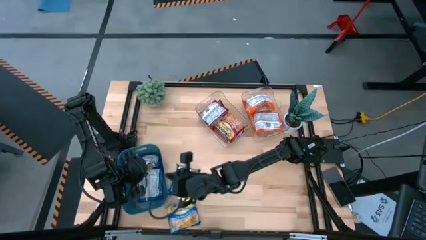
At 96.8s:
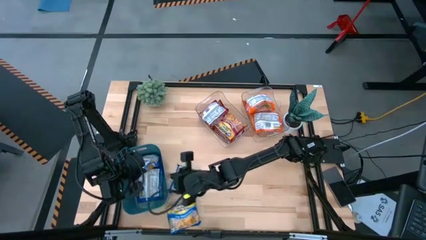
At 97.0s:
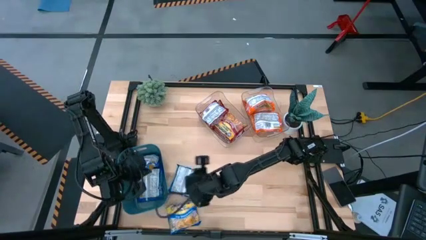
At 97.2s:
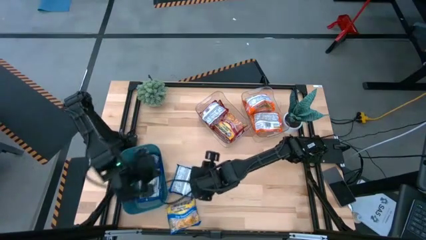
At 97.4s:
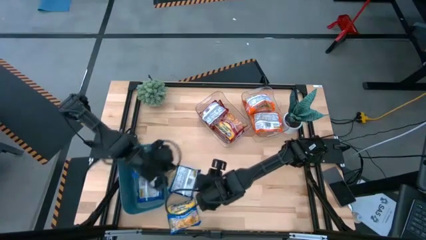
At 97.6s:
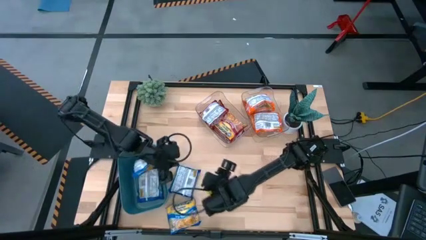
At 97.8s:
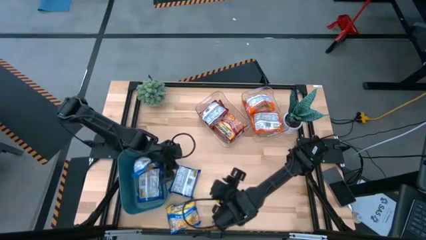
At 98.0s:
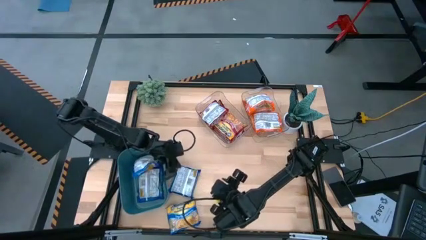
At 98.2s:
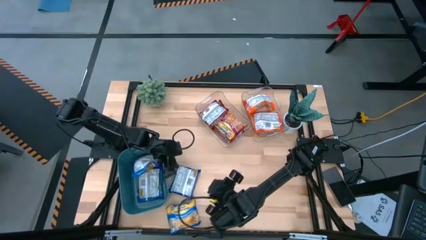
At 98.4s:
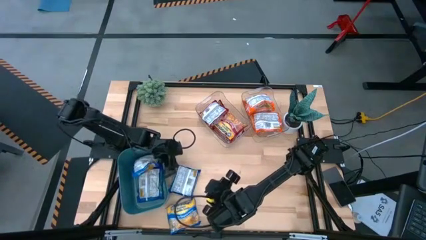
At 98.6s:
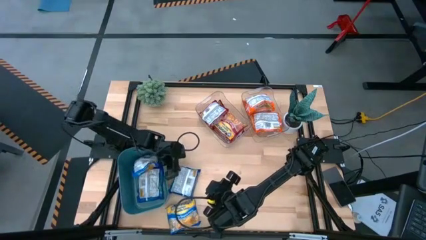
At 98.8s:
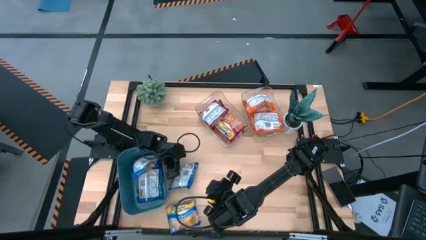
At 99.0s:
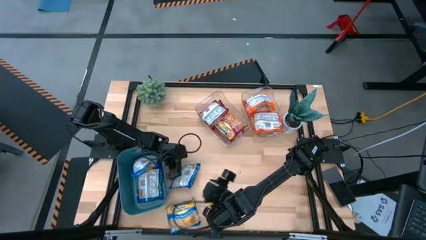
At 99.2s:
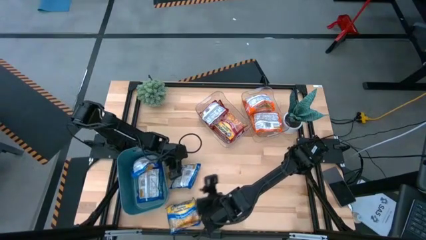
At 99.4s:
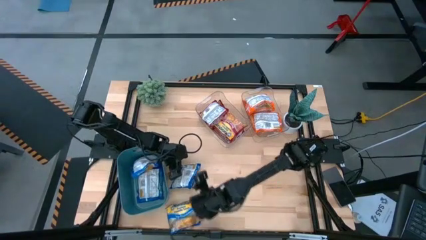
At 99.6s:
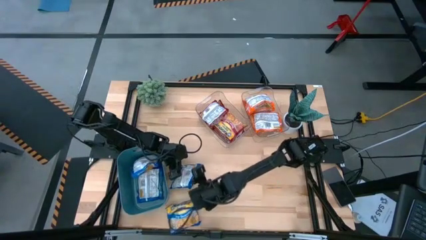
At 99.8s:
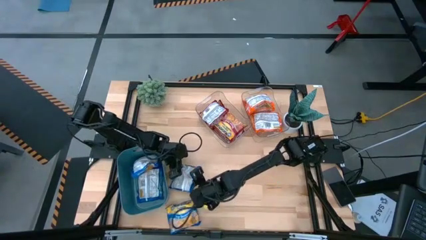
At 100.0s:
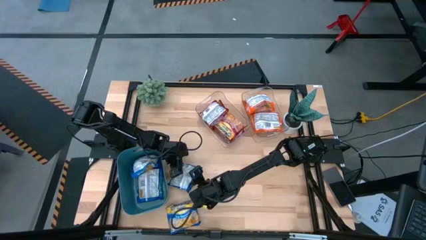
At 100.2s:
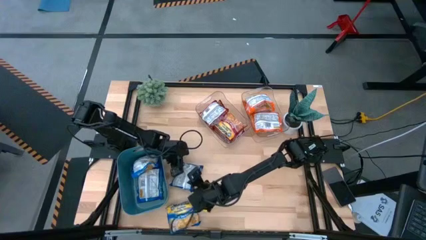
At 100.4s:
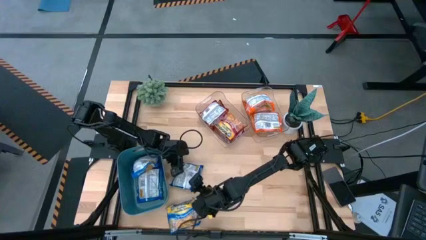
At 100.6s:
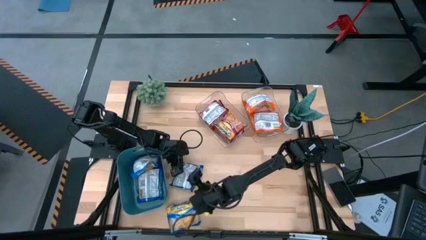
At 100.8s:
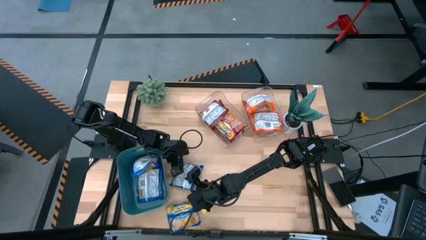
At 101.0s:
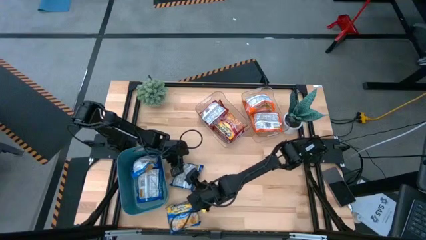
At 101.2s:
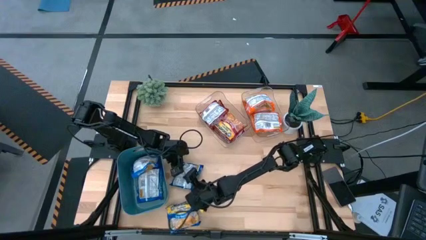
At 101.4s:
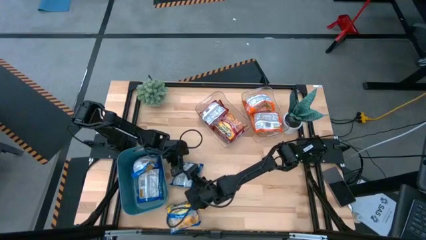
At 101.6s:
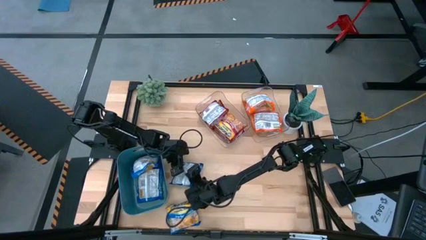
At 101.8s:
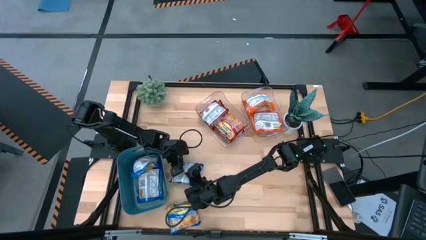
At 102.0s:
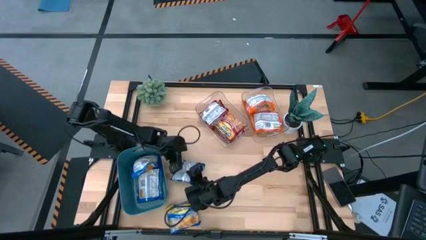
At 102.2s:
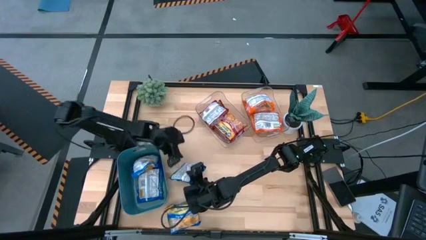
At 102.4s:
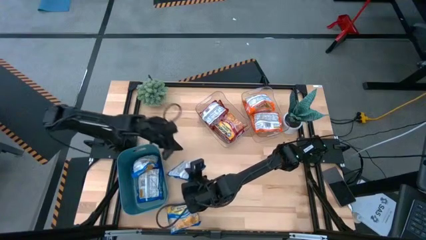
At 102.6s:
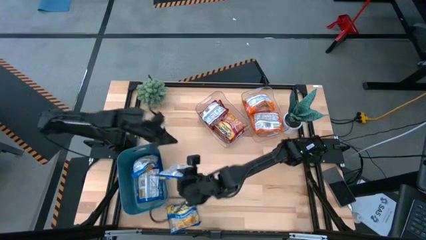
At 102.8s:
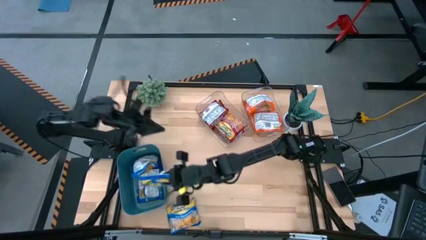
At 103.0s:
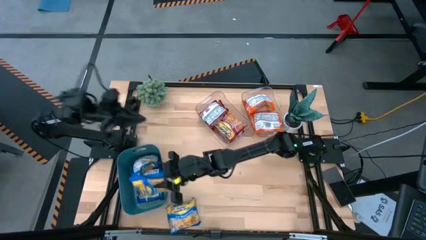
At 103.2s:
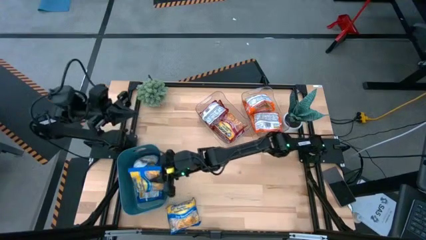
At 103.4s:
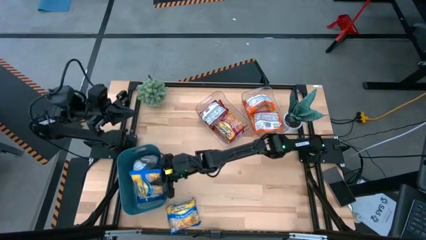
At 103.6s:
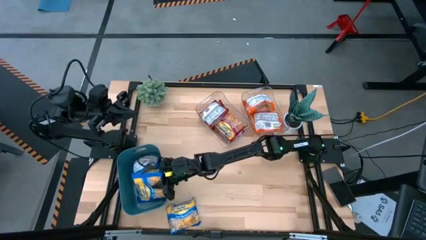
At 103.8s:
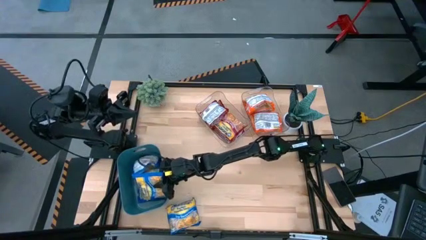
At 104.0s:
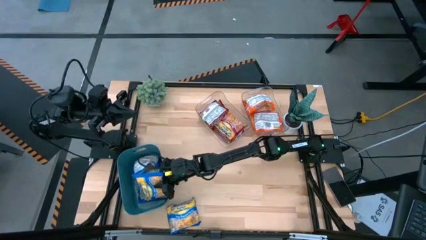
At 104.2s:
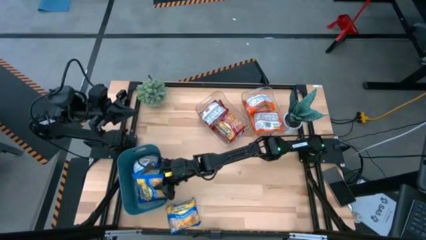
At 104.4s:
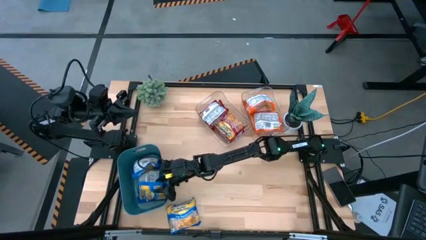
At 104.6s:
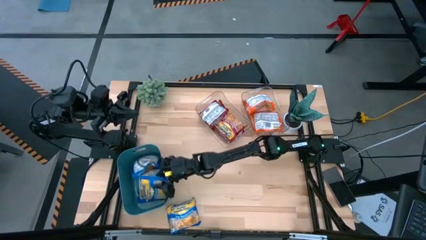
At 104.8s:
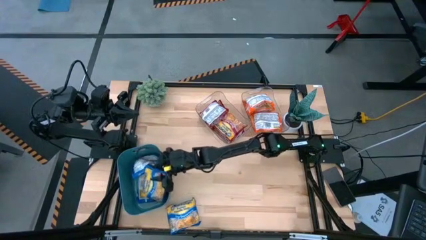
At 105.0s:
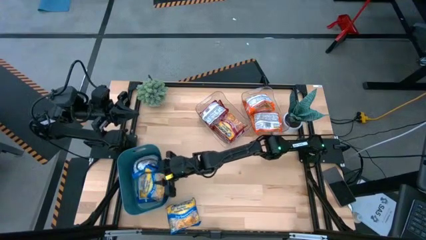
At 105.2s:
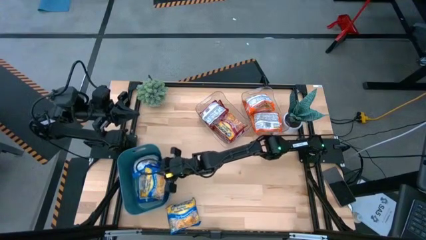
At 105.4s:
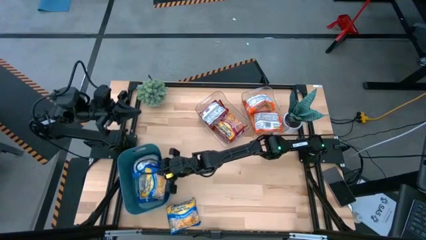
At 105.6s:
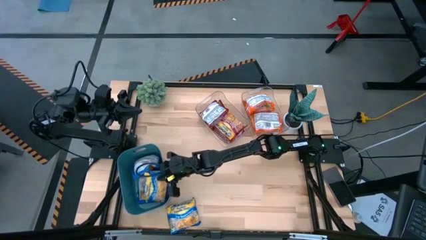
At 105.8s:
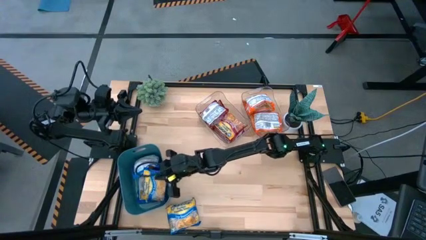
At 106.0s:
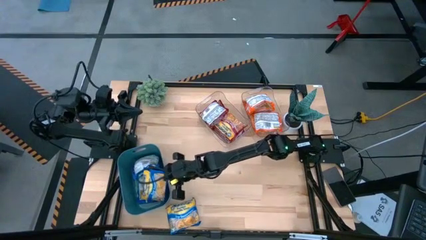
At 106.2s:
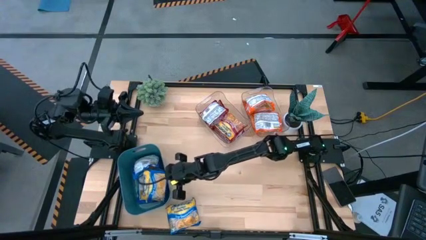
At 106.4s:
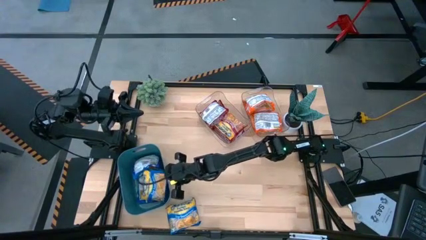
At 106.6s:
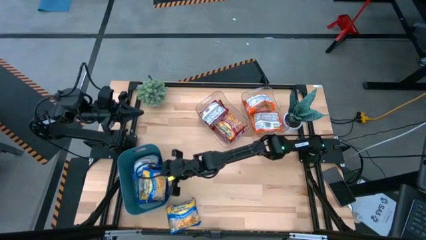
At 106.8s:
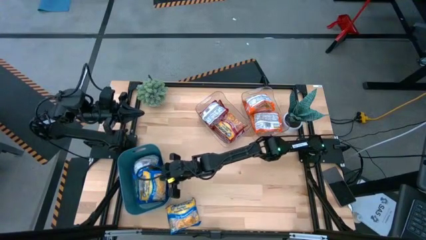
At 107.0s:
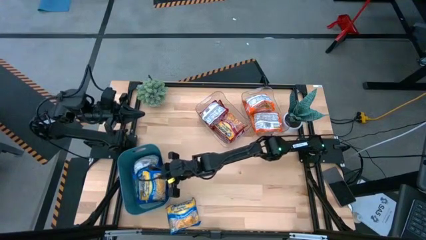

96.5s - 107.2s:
Task: Sort Maruchan noodles
Put the blue noodle pack into the blue bin

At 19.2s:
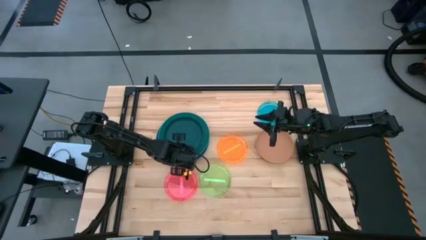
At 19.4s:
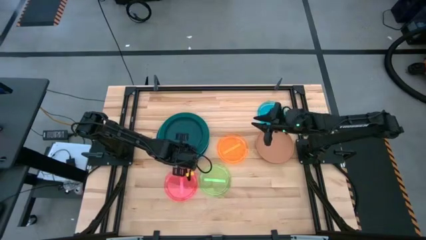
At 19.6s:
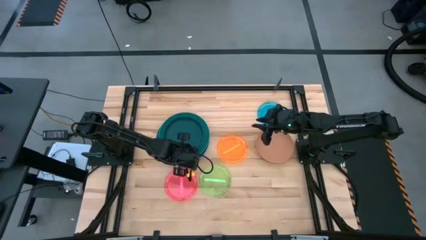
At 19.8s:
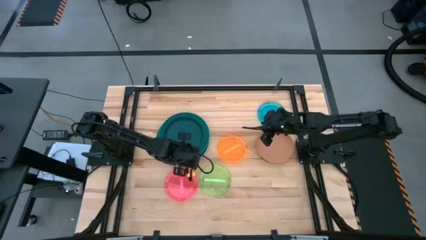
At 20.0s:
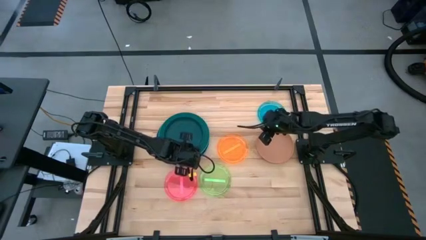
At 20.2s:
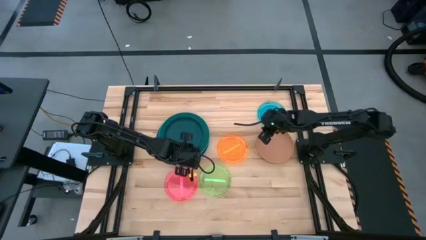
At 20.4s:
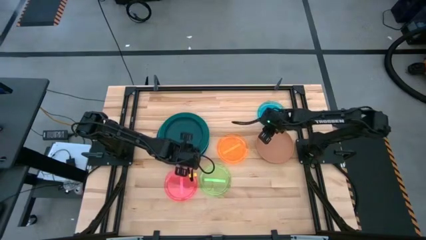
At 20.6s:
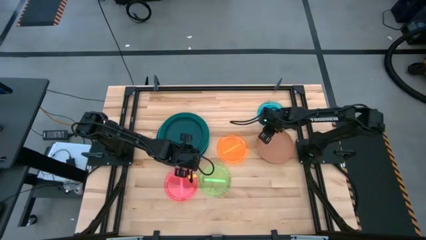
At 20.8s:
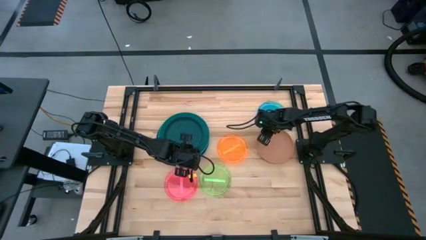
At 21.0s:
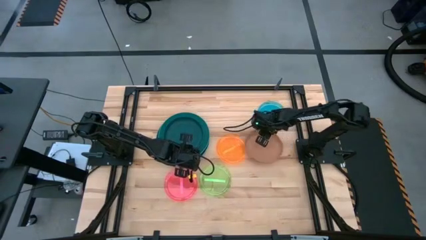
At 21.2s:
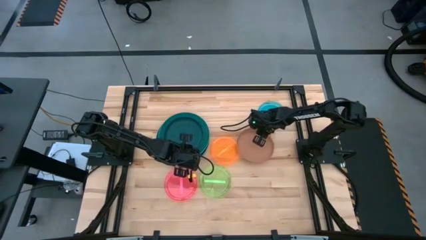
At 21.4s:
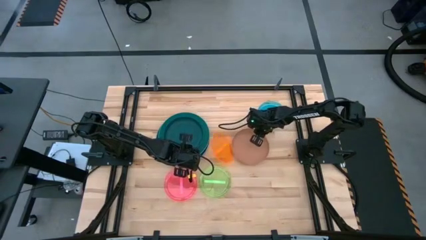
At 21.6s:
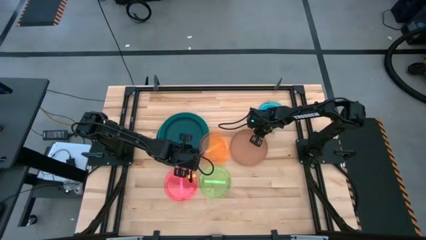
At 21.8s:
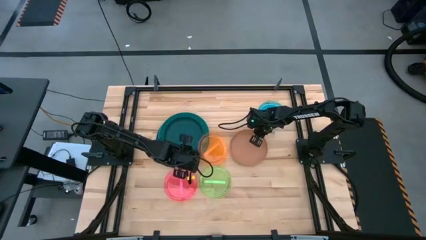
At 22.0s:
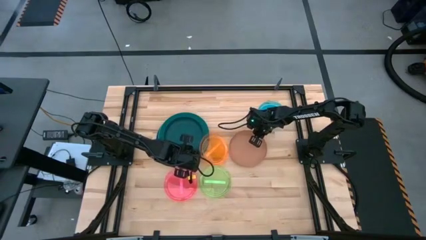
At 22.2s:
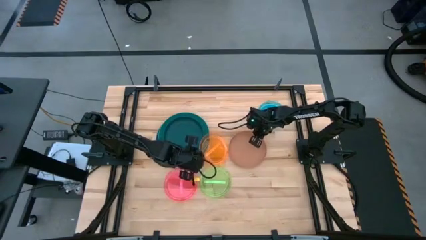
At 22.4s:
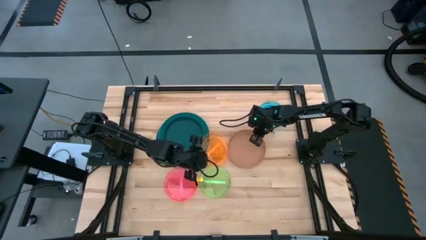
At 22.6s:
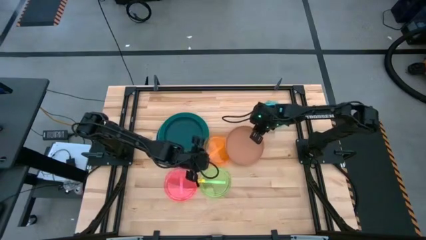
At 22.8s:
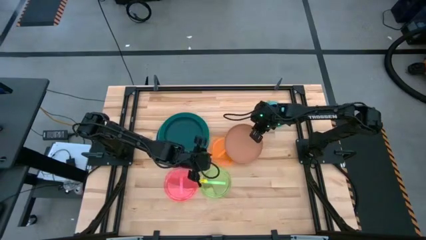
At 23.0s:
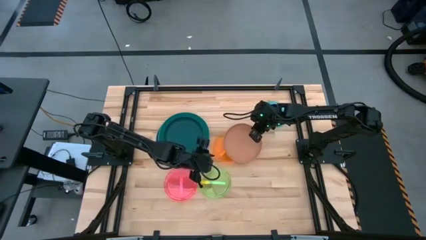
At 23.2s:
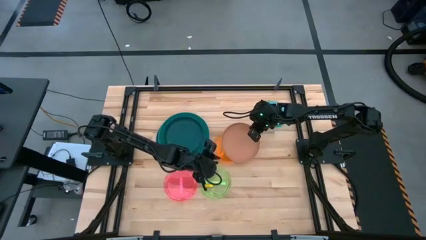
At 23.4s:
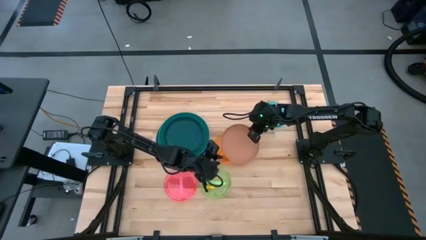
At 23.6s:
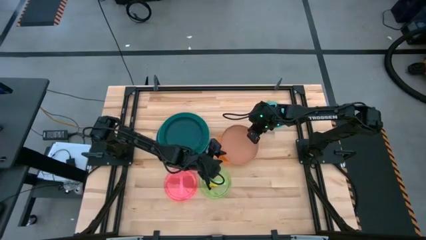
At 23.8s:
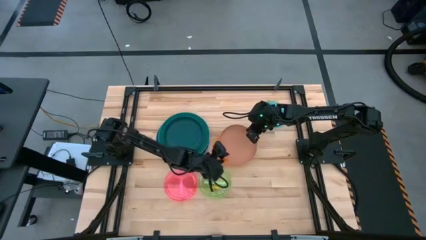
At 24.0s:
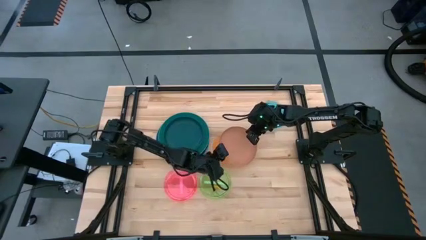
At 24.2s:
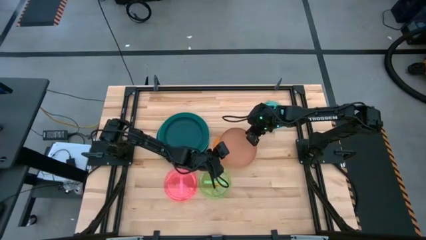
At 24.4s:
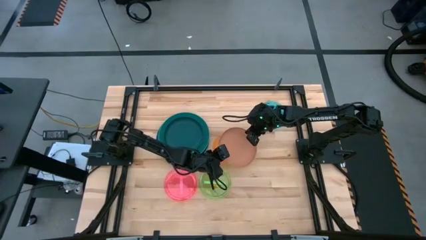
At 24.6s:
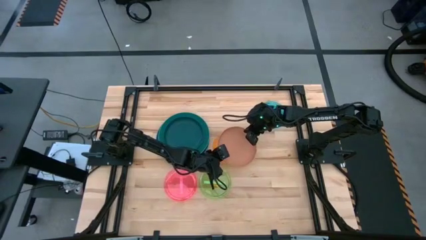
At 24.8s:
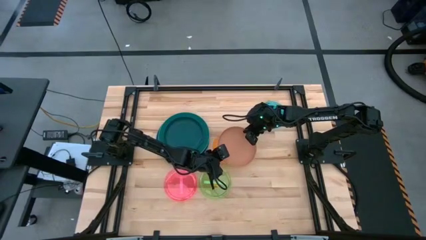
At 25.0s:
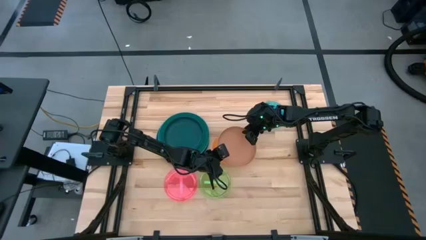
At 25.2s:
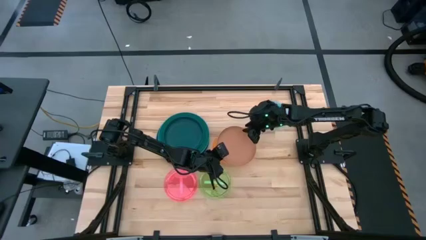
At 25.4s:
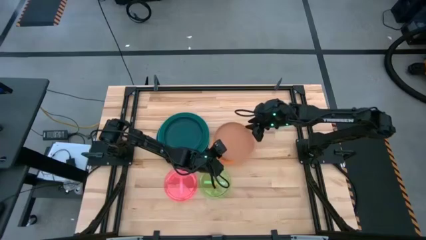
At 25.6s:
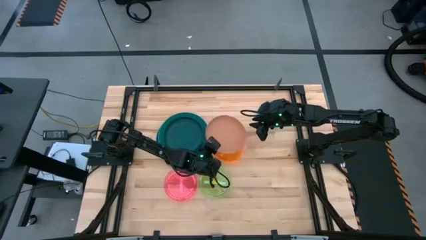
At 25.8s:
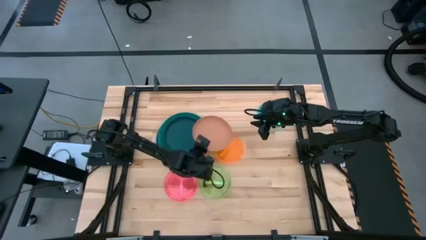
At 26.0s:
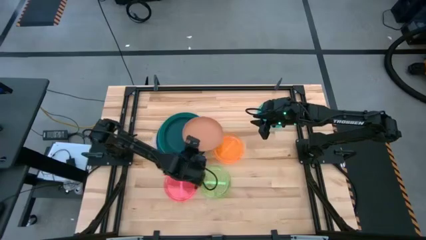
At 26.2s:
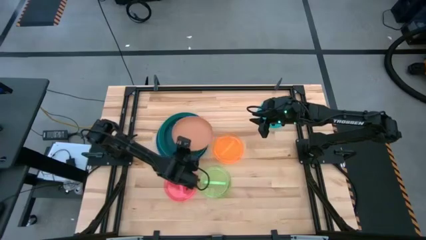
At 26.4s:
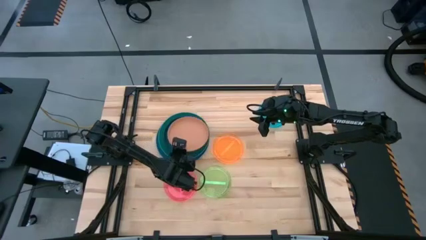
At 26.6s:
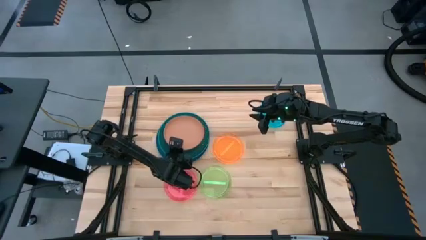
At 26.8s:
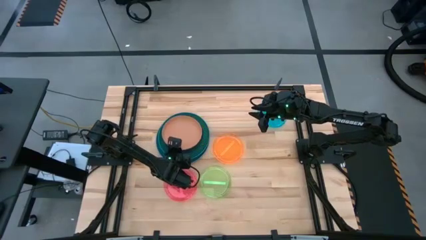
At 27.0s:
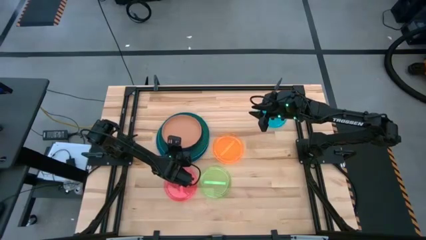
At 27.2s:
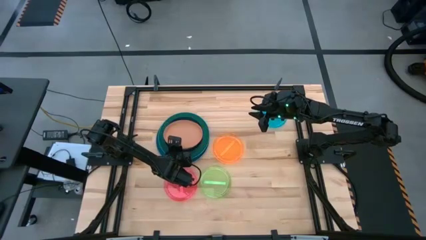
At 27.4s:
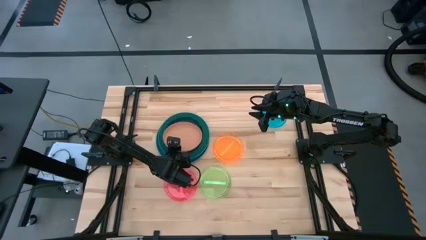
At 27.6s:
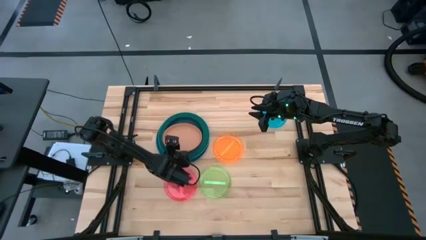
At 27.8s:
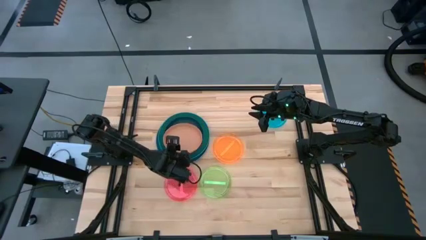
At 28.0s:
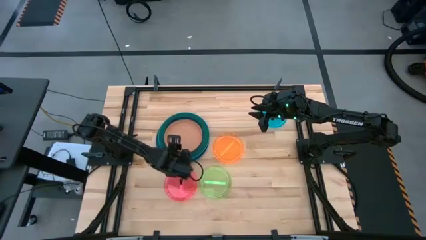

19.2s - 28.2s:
Task: Stack plastic plates
Stack the brown plate on the dark blue plate
